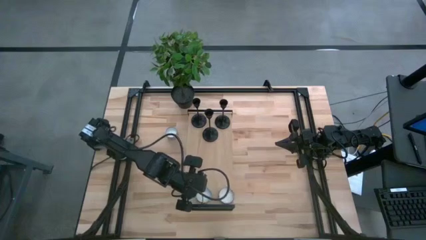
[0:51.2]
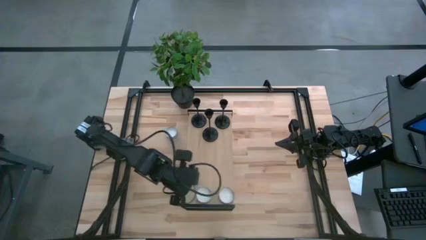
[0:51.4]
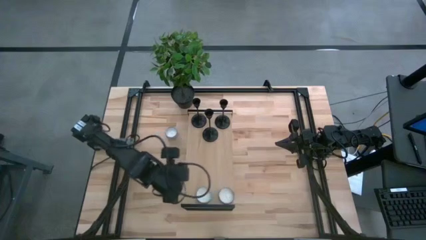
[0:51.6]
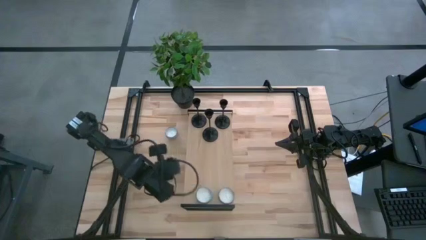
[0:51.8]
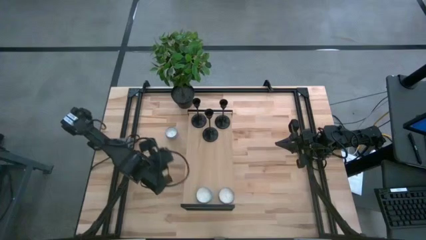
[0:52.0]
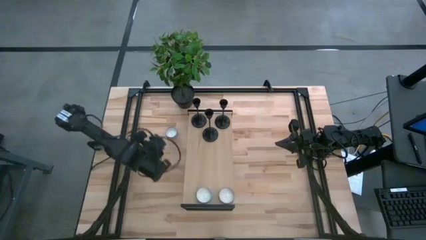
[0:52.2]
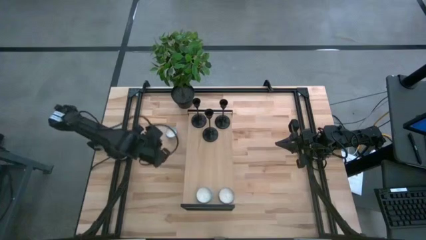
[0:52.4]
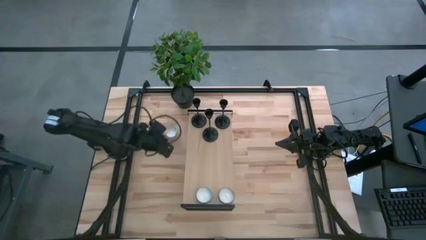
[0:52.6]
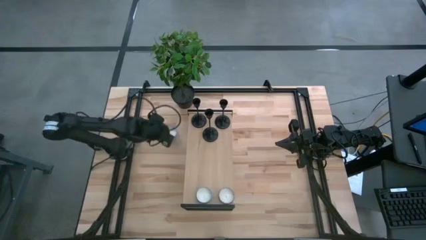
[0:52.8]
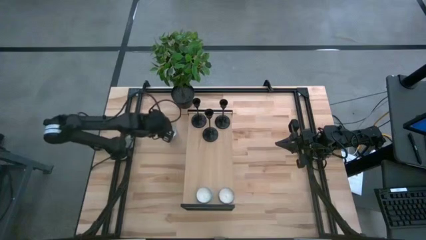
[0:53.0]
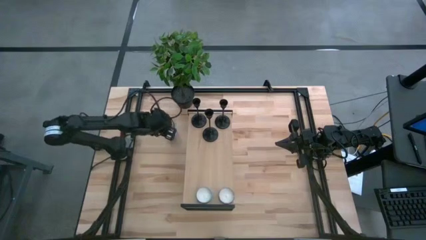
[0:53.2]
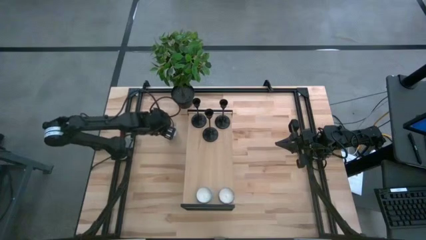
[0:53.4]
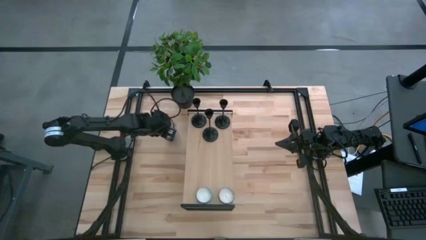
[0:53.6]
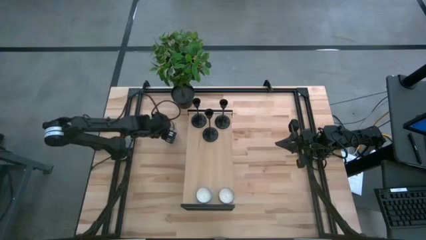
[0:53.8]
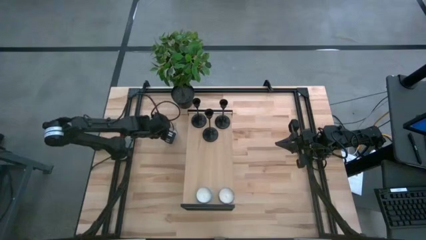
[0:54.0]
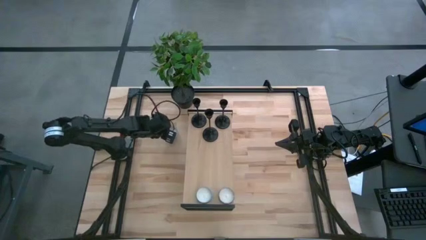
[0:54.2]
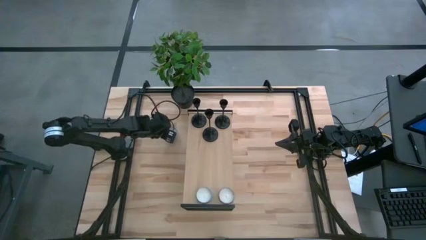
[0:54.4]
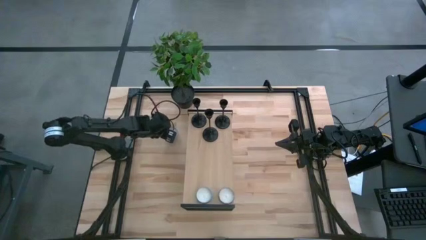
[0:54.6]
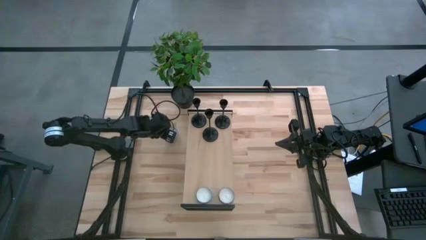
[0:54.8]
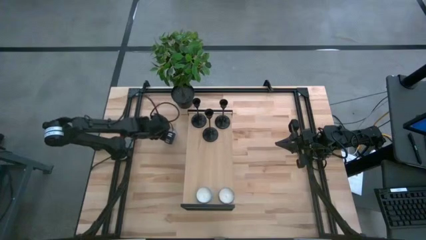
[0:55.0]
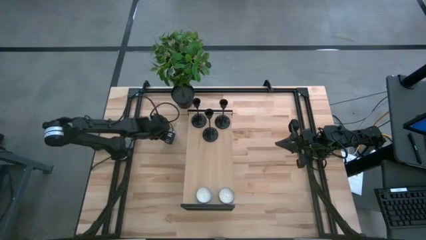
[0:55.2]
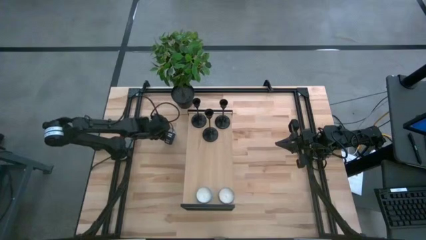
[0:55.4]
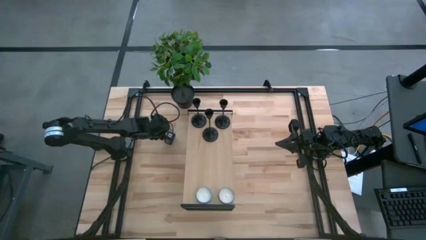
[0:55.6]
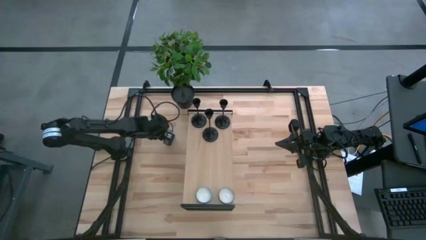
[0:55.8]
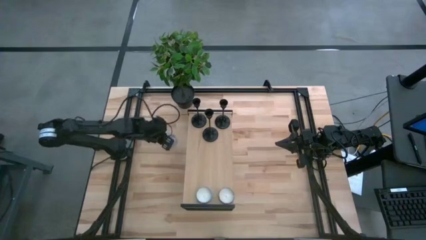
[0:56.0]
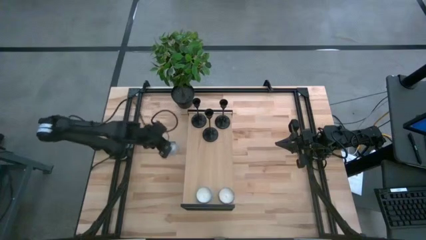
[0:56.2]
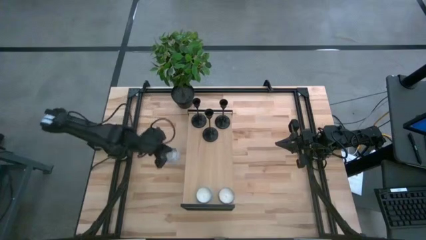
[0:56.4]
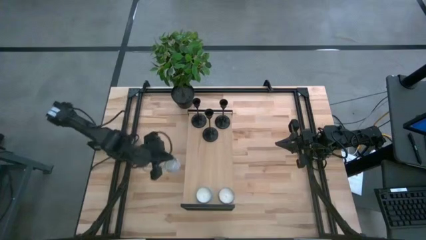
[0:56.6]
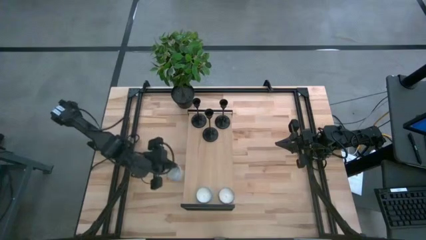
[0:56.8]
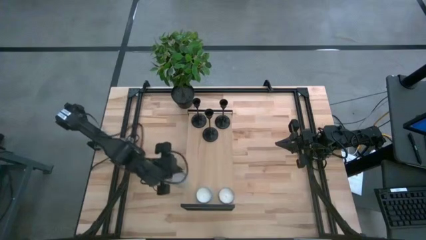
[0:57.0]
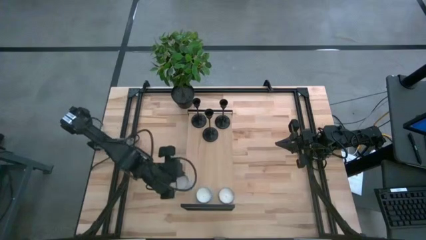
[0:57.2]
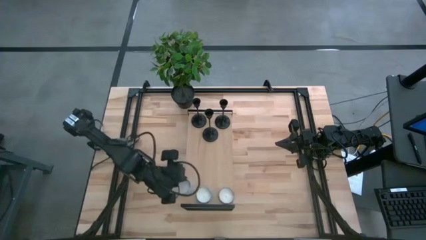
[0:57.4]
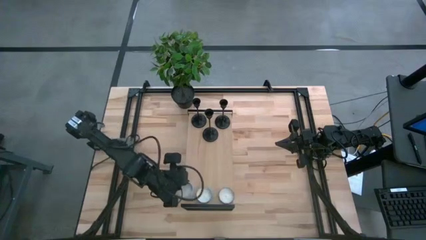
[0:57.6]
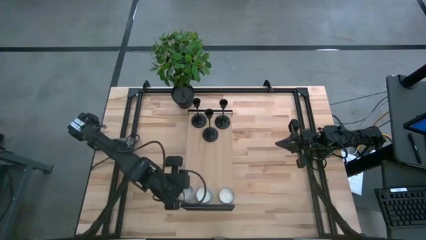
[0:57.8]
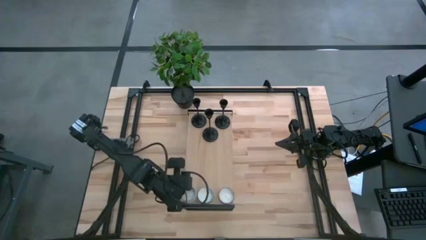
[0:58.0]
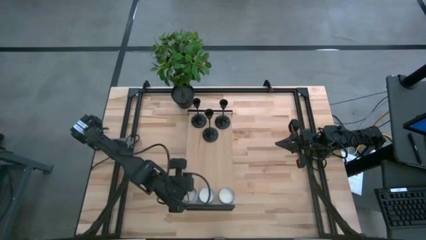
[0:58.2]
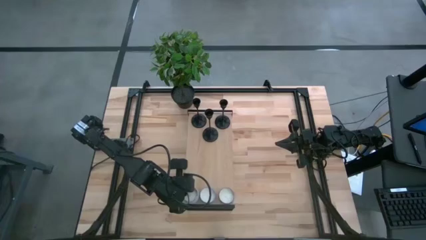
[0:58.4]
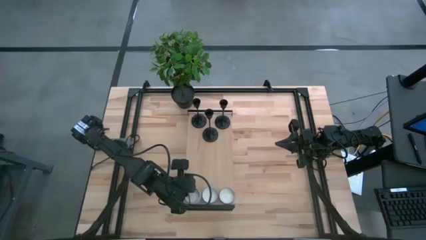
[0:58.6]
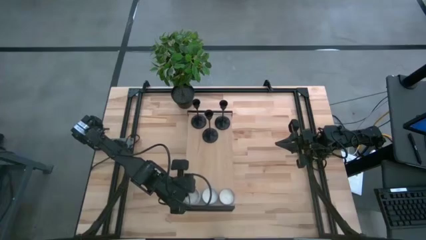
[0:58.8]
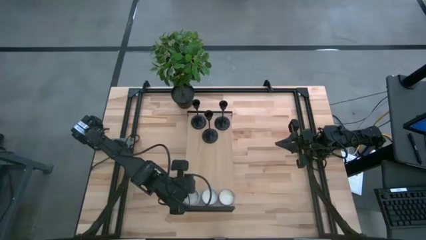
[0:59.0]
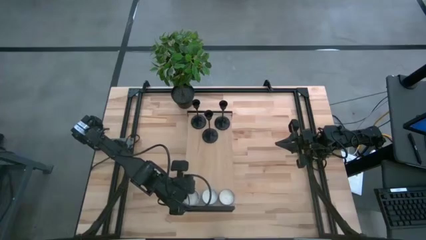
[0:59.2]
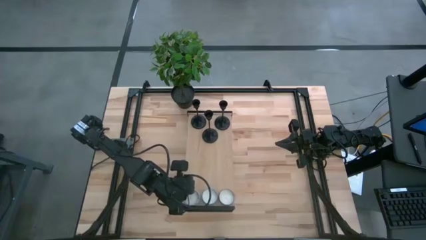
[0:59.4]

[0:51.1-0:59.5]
Task: Pick & Place candle stick holders
Put the white scented candle on the shelf aligned with the blue scented candle

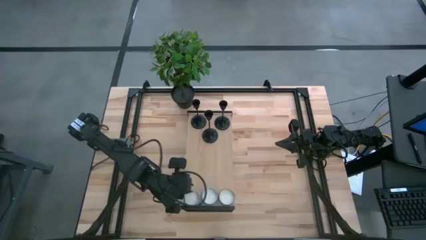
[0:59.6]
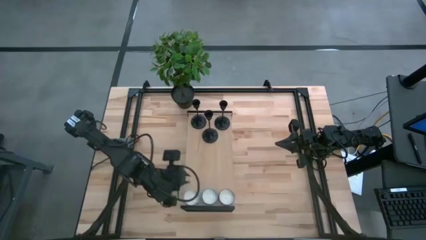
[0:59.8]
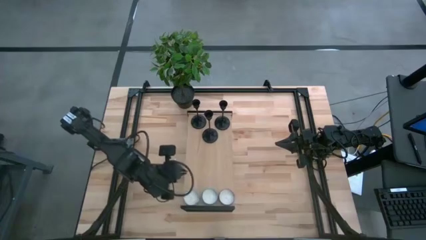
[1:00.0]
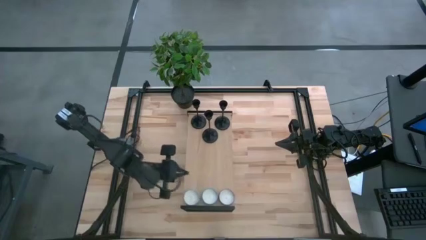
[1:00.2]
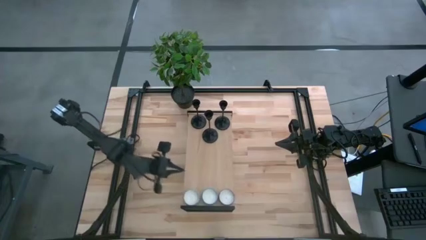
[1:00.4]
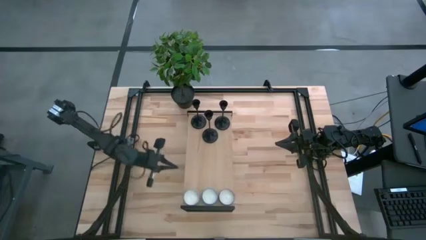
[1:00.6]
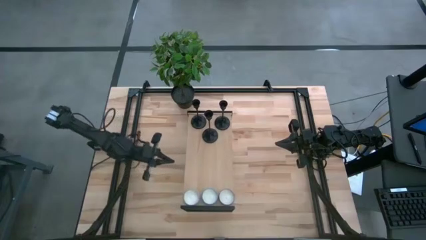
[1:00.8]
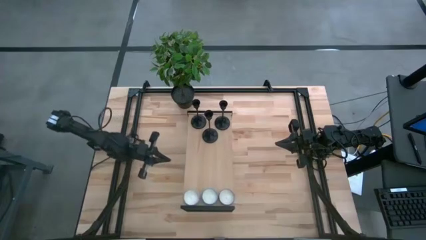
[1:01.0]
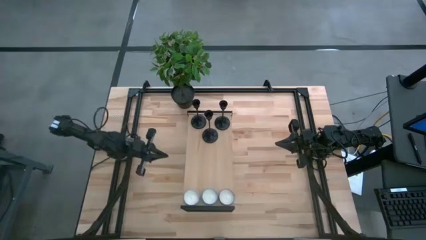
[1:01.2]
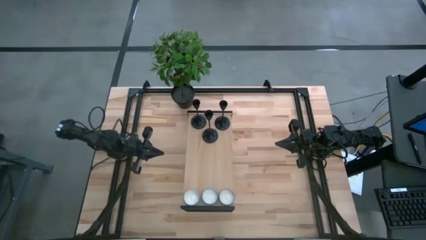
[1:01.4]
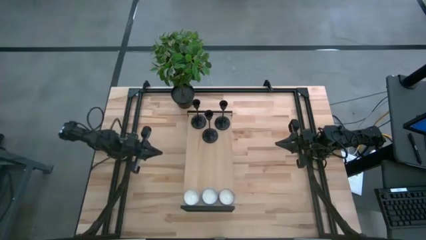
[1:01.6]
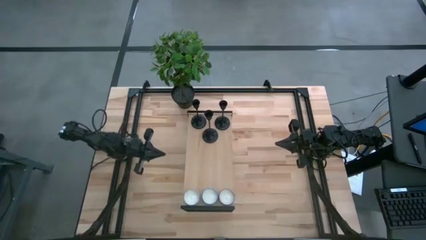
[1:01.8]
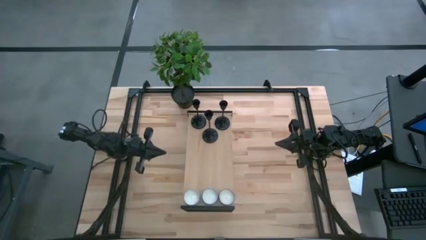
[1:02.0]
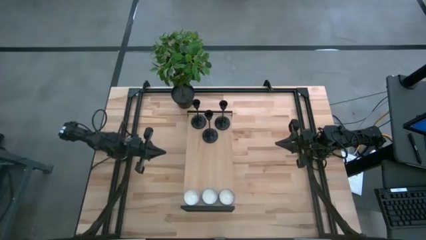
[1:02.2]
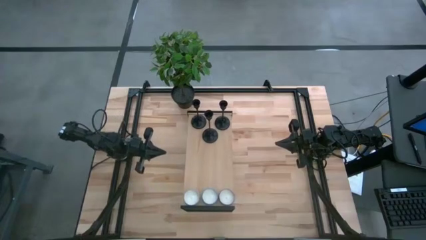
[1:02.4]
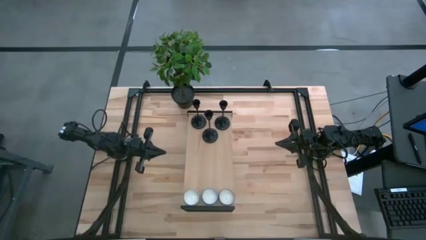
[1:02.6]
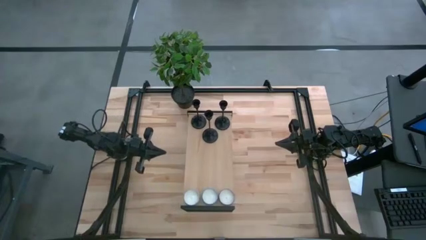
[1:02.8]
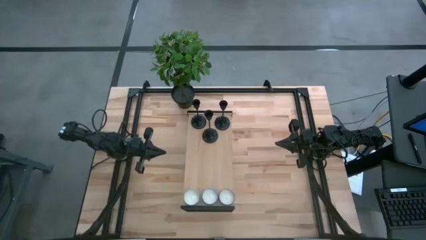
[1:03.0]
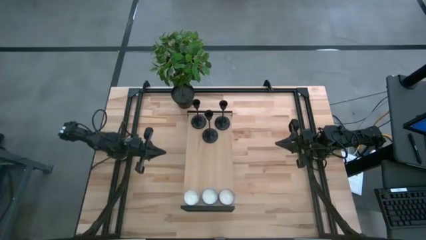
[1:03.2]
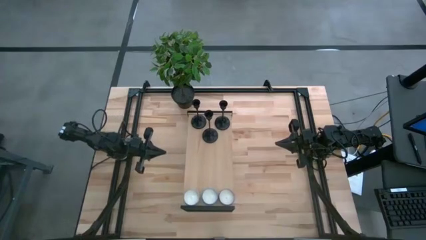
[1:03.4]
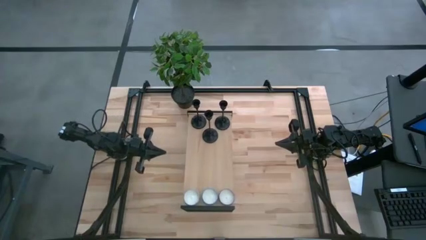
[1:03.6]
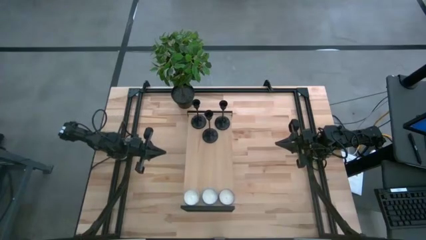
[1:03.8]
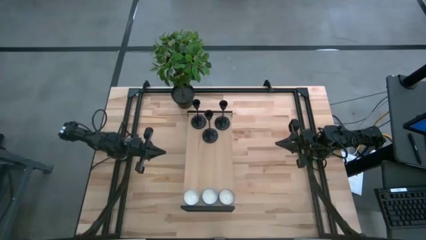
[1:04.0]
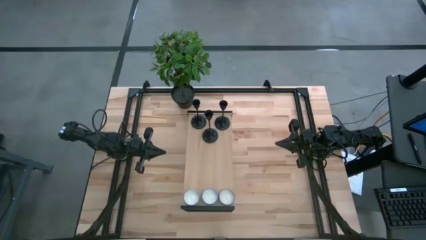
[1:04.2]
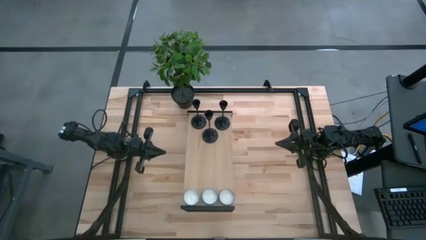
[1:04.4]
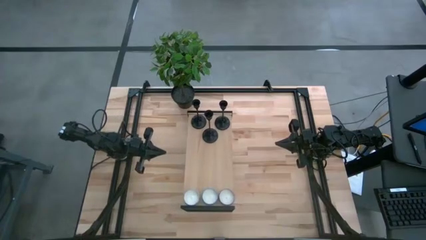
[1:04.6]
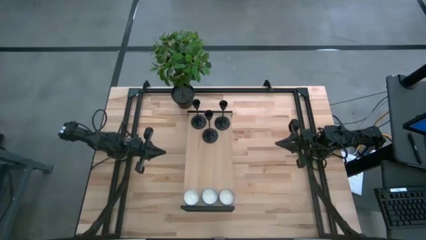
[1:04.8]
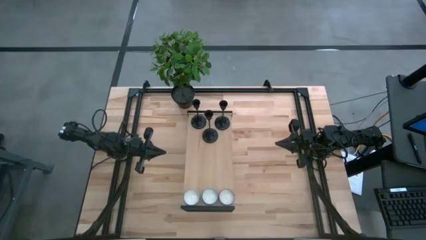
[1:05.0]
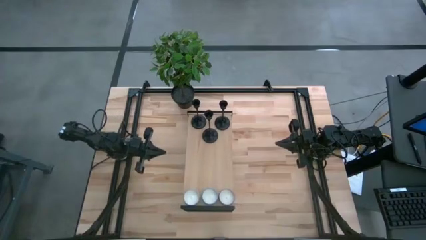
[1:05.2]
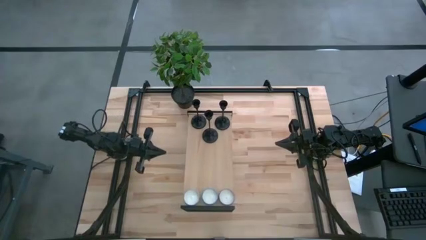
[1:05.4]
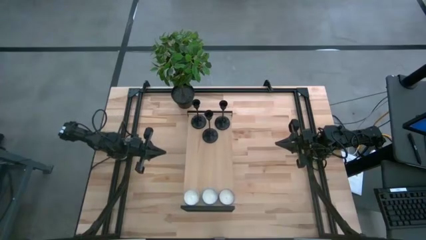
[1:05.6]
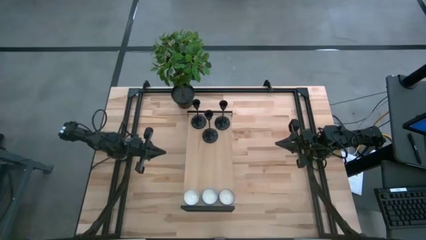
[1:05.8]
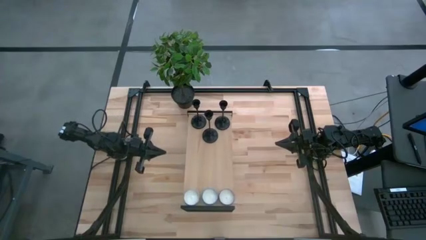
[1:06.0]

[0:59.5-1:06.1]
Return to Home Position
